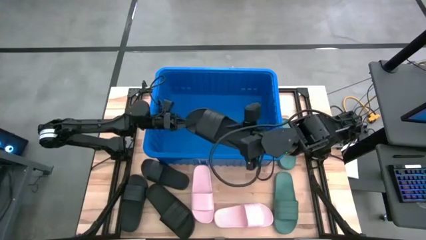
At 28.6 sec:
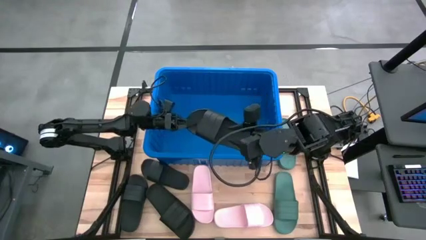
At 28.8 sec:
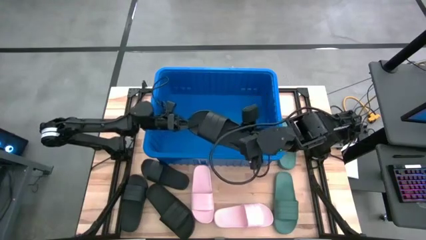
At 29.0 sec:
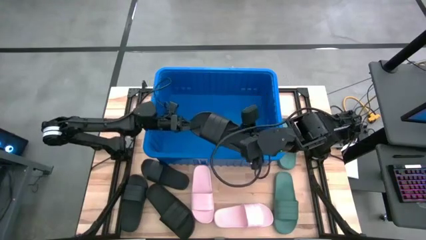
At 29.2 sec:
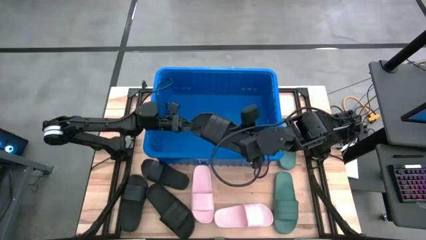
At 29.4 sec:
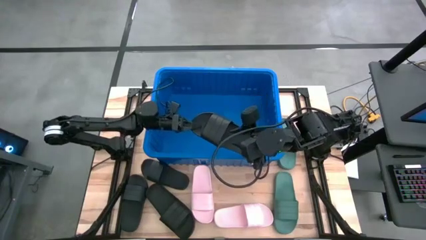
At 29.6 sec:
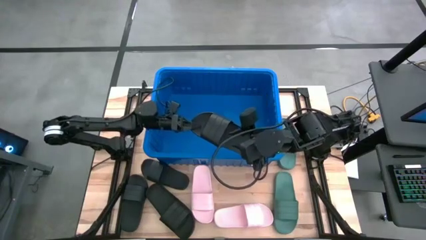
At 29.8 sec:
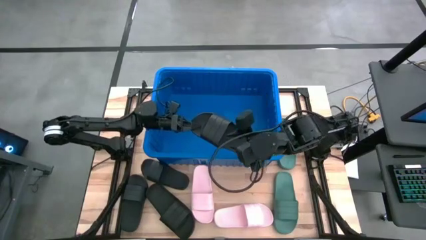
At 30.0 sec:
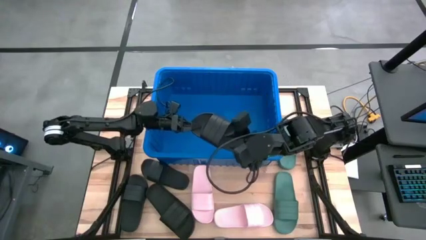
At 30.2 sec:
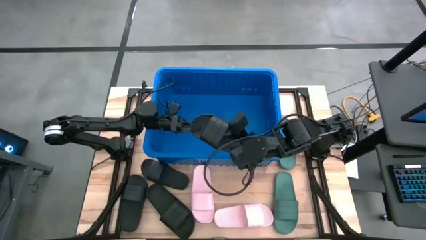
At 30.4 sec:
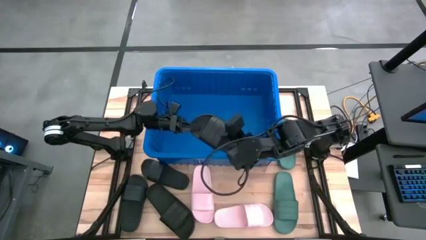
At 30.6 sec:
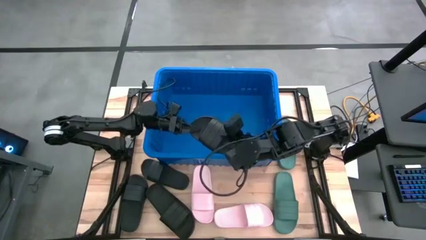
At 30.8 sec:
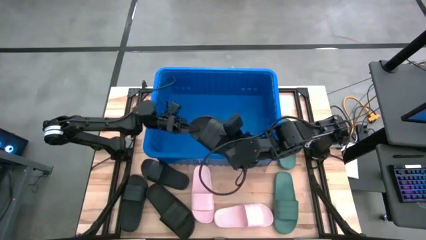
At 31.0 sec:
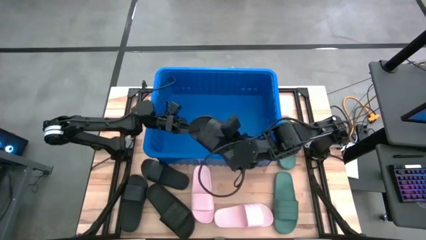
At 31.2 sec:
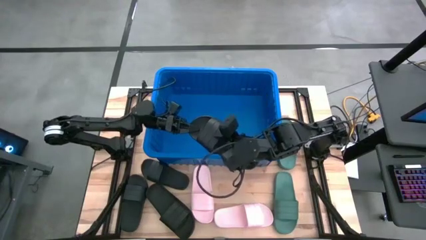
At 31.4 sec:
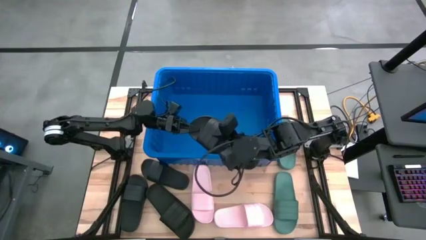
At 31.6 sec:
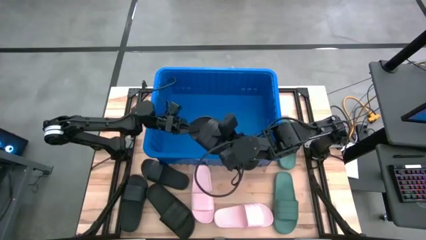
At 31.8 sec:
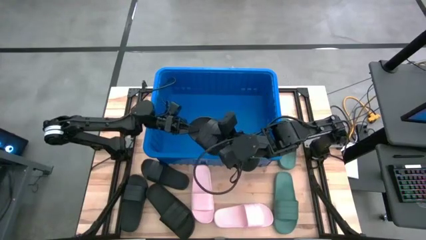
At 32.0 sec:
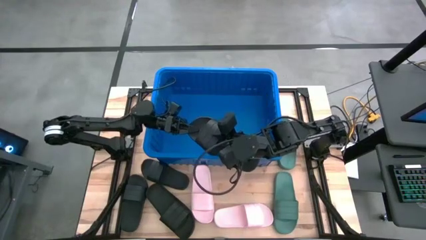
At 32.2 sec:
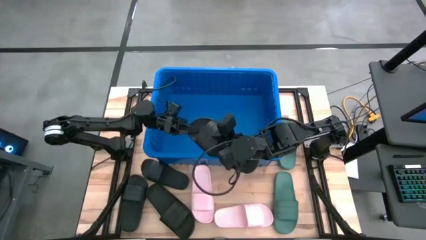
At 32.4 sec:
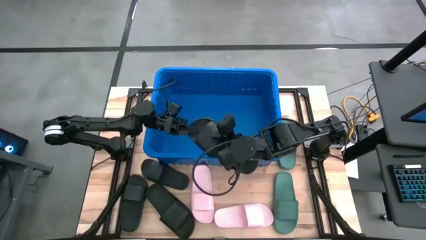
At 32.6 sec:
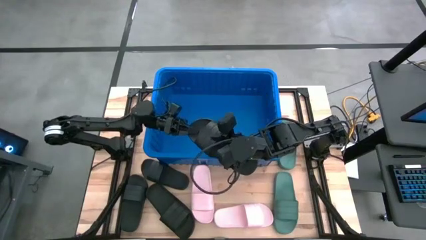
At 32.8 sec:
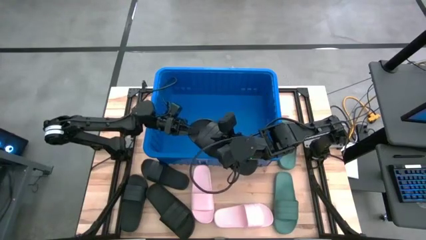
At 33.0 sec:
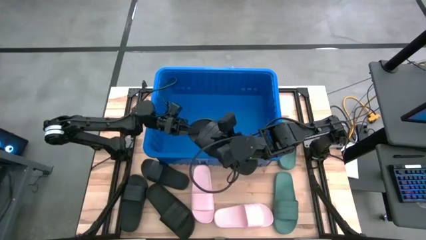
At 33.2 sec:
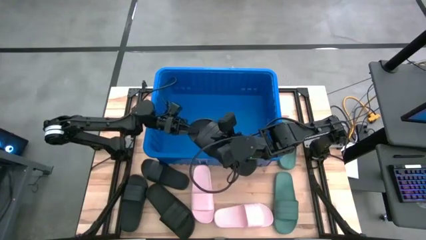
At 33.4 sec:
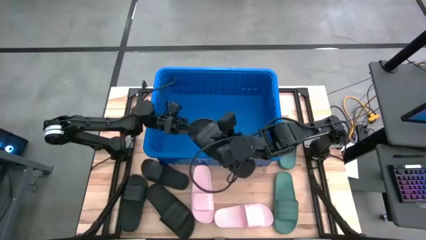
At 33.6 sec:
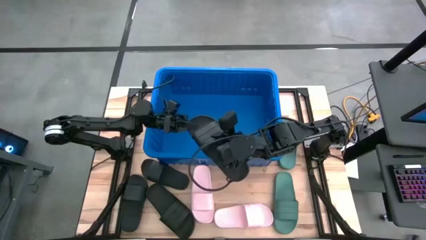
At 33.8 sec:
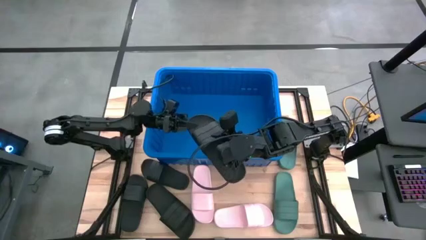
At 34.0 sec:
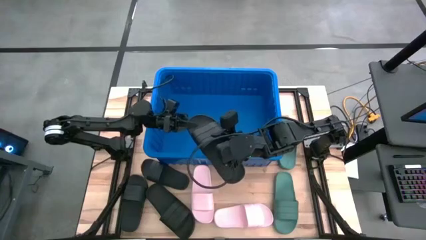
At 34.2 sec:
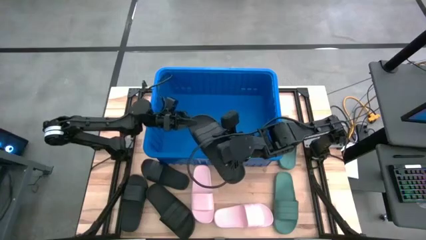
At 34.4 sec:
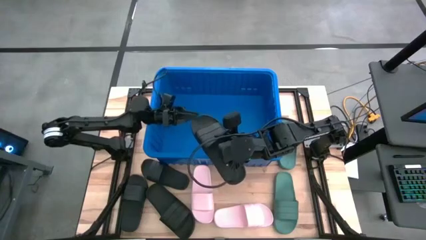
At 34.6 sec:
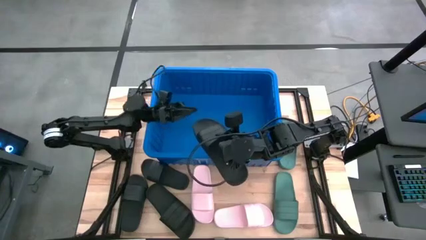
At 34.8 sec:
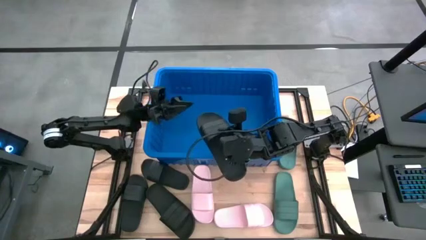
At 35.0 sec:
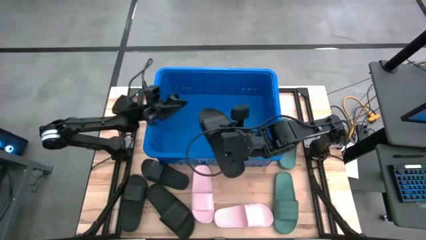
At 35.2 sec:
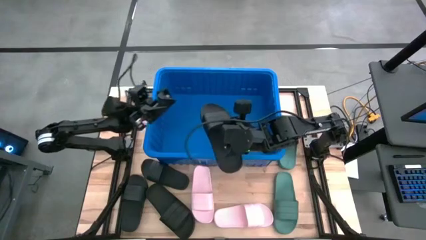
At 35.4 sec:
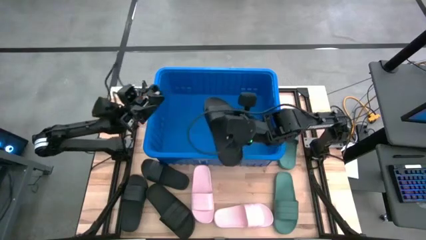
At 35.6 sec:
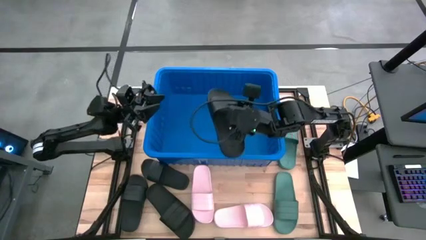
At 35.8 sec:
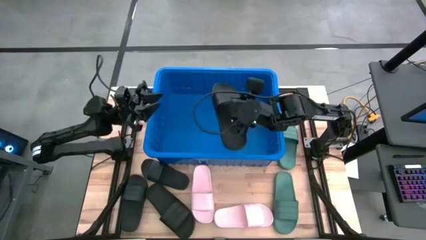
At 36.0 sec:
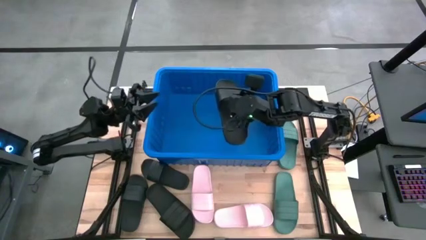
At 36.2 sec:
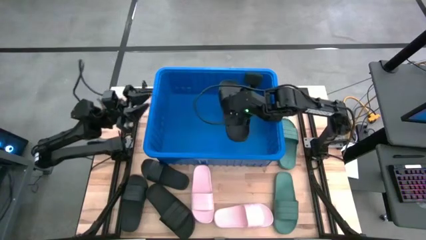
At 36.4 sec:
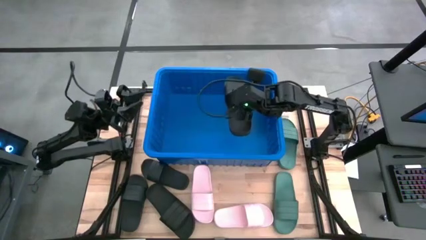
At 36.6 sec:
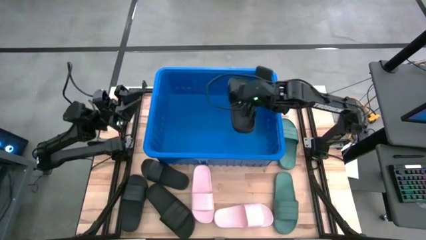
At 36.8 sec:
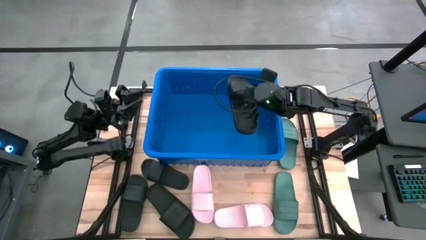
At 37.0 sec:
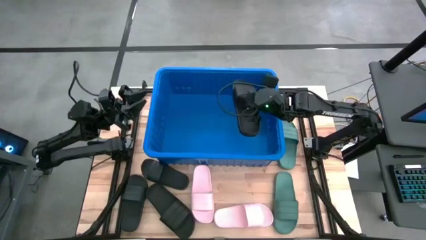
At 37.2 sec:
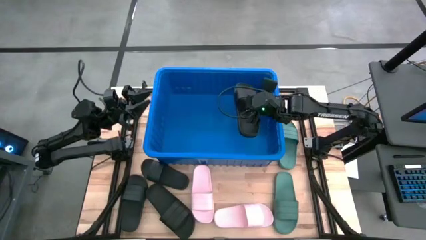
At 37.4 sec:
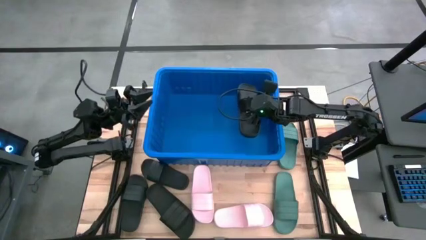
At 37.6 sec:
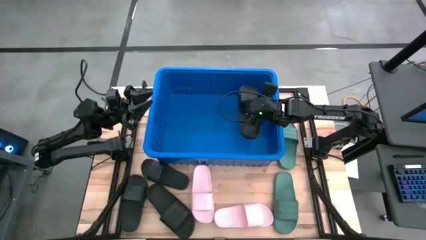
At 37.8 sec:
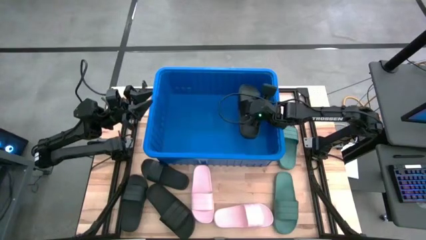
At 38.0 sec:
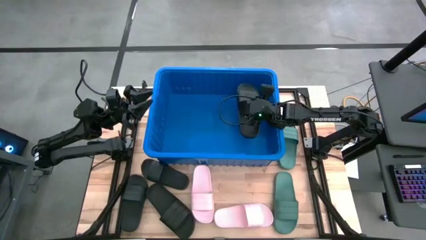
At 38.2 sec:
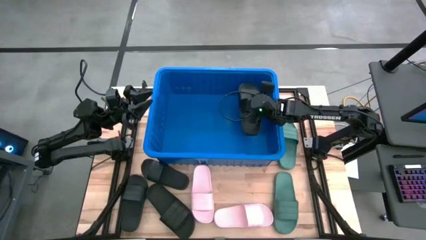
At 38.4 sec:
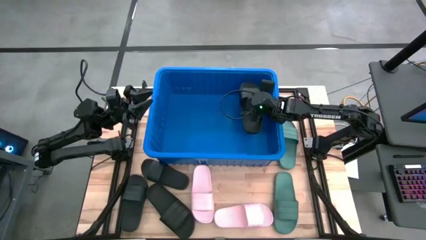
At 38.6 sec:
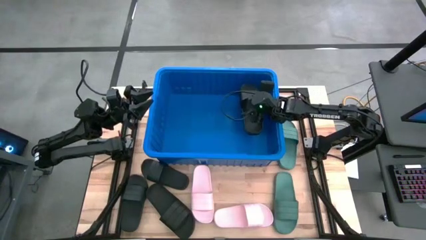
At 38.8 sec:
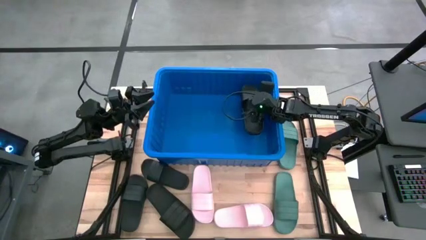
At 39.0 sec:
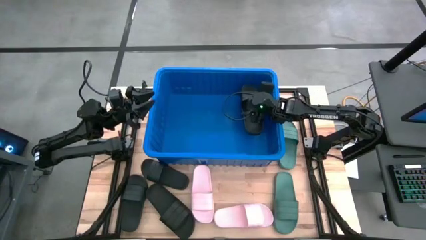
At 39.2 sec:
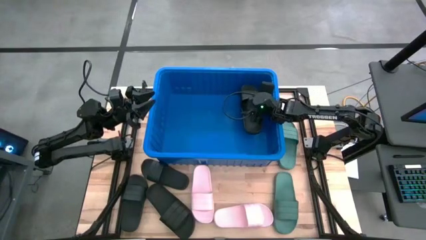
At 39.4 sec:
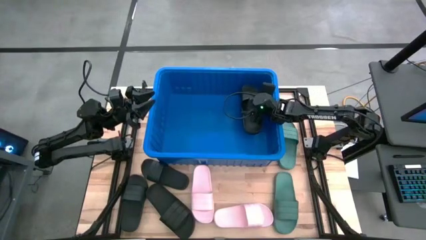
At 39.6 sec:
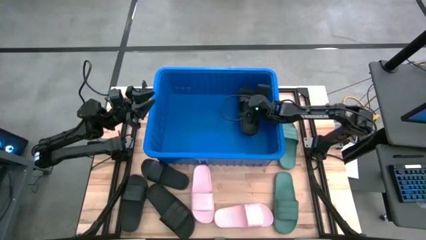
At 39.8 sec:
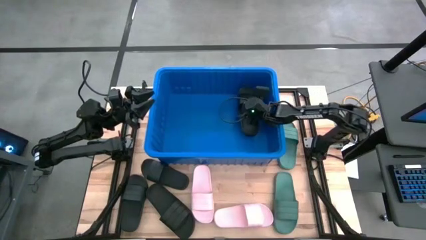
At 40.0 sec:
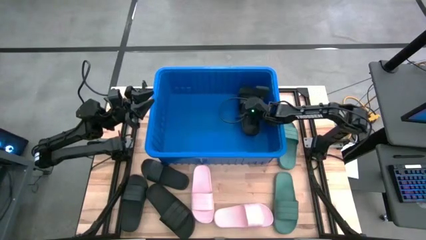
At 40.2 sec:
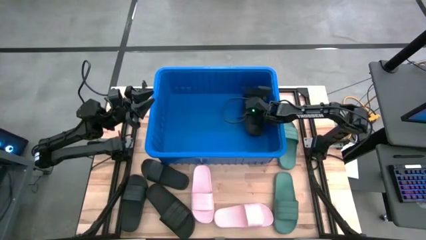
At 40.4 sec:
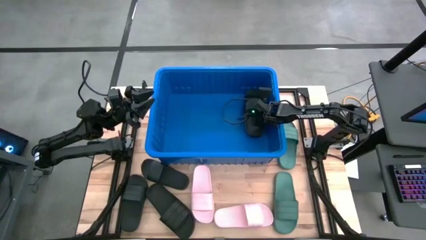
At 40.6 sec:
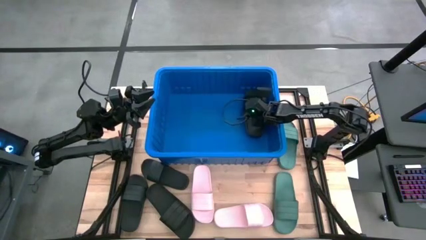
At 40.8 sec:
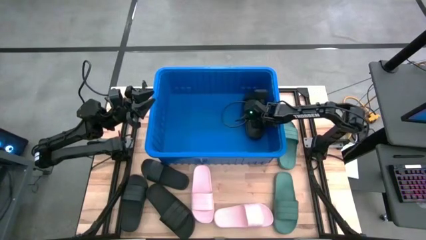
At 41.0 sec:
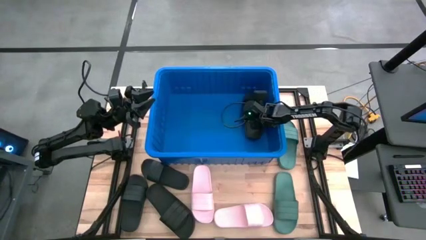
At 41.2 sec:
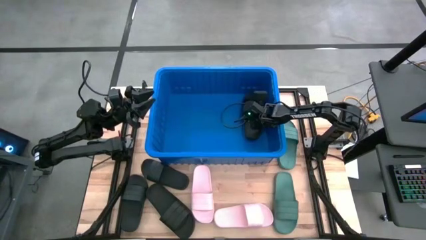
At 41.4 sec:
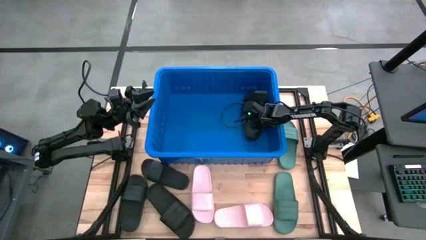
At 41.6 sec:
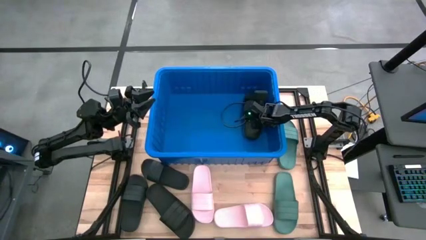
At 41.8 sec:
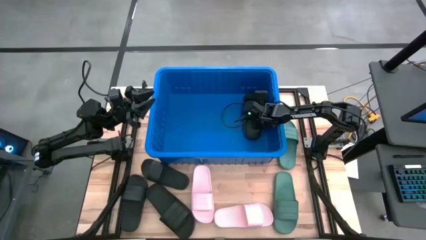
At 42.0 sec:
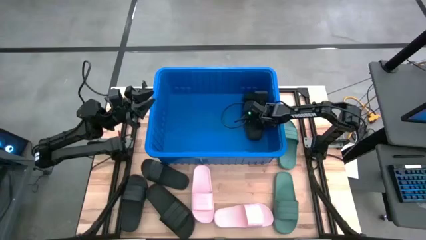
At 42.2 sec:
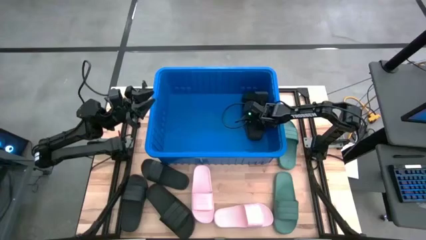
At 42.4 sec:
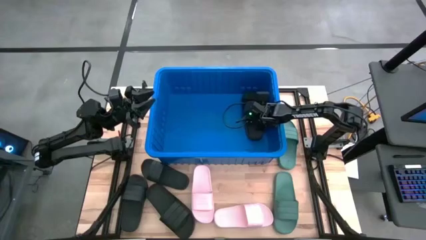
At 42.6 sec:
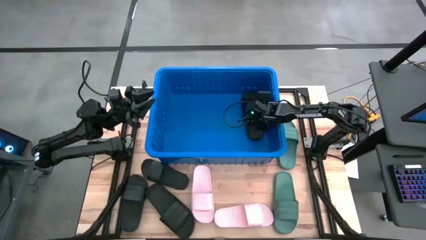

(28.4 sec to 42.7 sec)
Task: Pick and place slides into bin
Put the black slide into the blue bin
